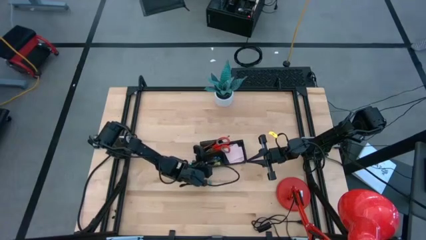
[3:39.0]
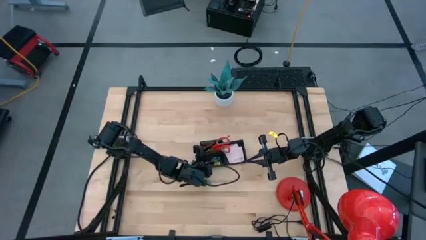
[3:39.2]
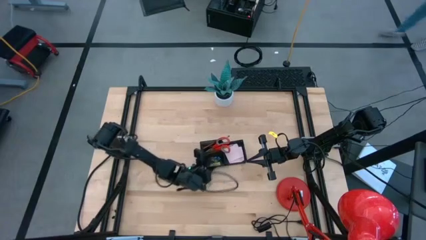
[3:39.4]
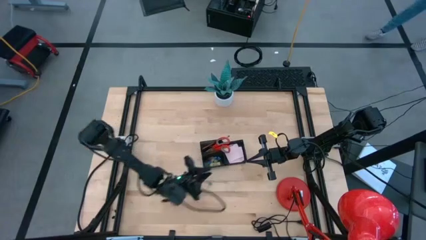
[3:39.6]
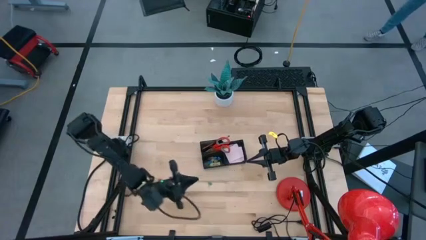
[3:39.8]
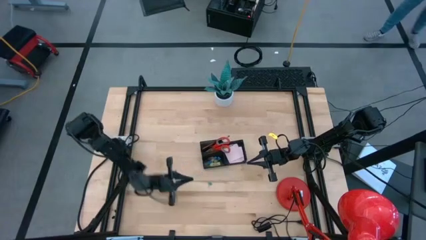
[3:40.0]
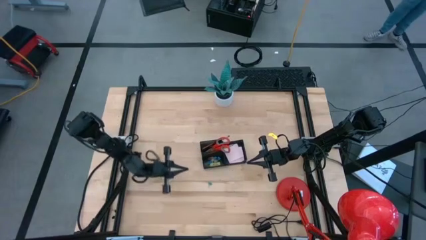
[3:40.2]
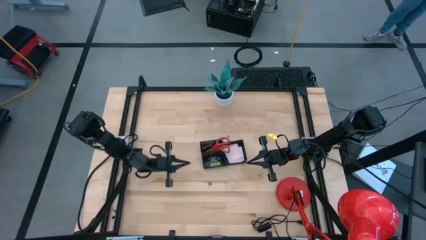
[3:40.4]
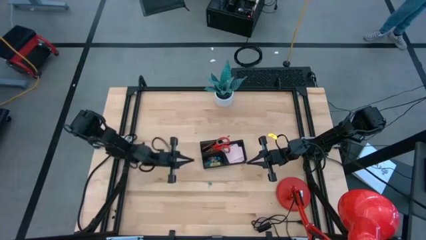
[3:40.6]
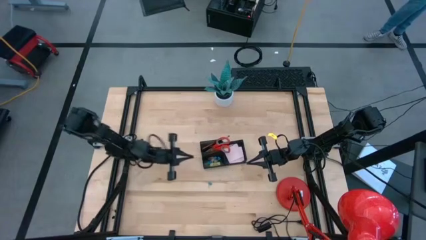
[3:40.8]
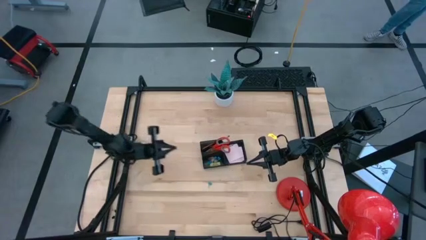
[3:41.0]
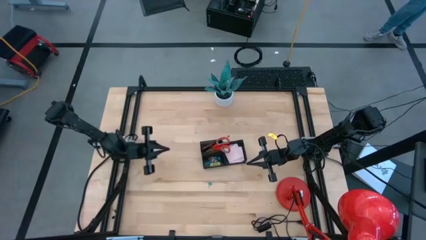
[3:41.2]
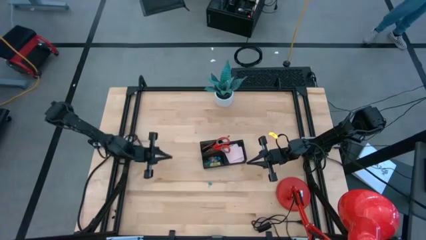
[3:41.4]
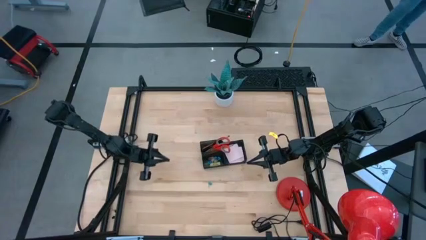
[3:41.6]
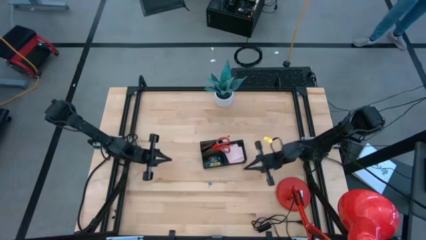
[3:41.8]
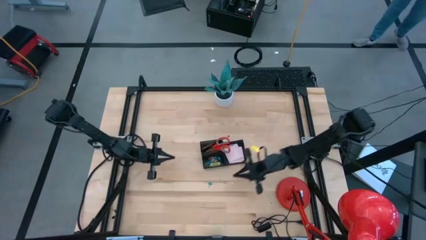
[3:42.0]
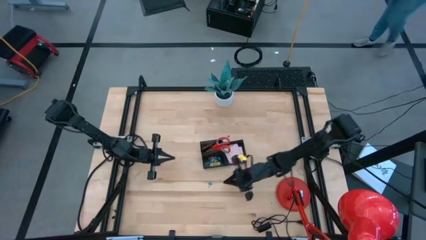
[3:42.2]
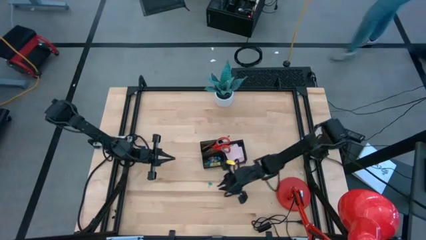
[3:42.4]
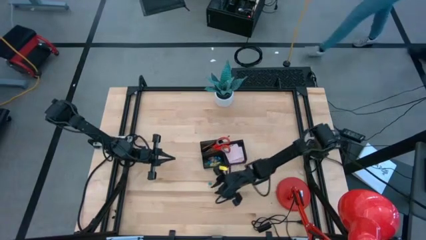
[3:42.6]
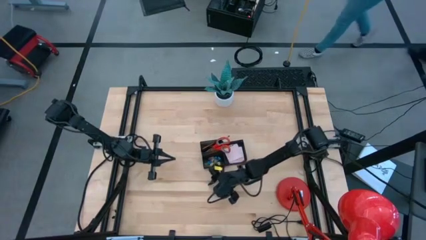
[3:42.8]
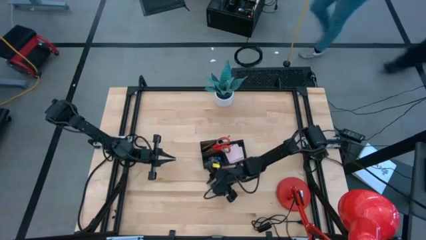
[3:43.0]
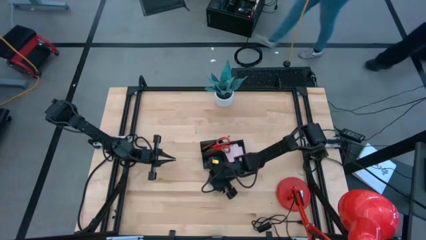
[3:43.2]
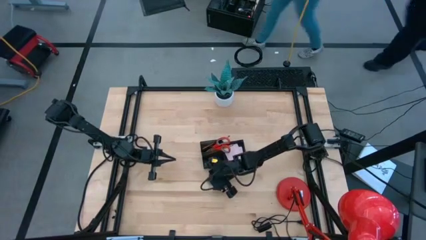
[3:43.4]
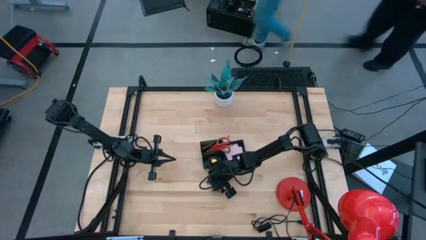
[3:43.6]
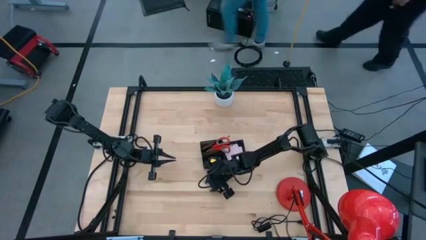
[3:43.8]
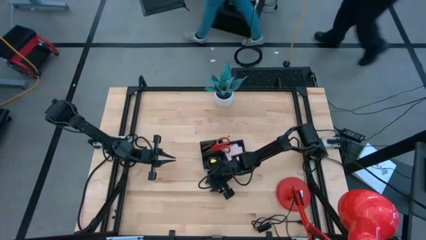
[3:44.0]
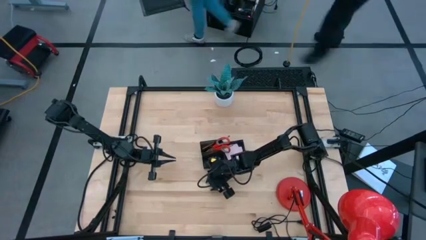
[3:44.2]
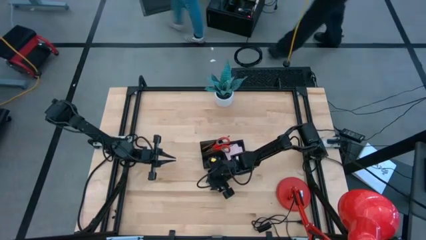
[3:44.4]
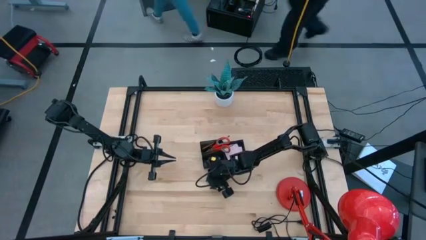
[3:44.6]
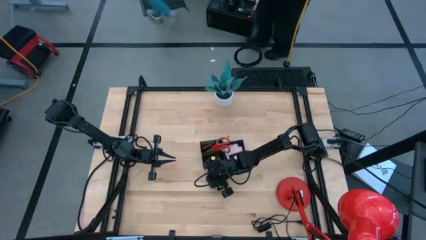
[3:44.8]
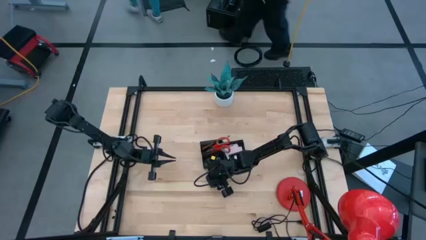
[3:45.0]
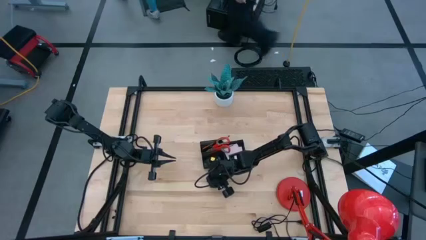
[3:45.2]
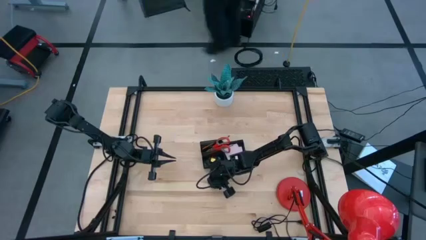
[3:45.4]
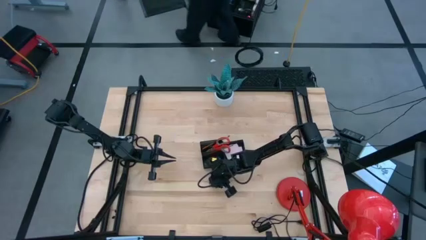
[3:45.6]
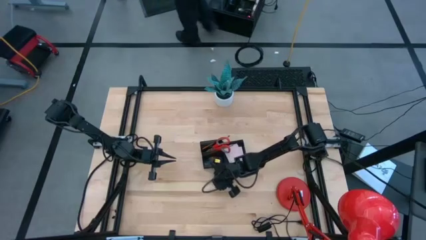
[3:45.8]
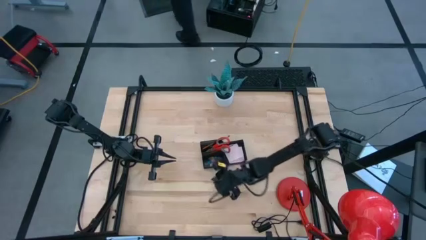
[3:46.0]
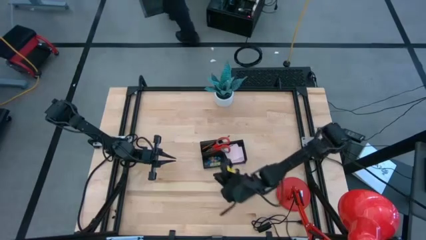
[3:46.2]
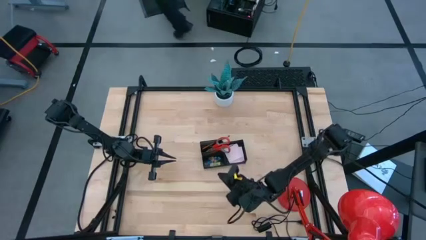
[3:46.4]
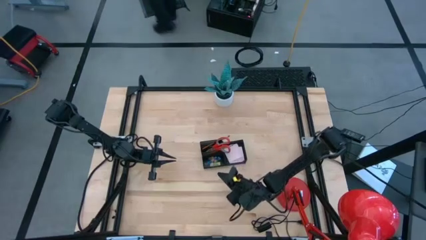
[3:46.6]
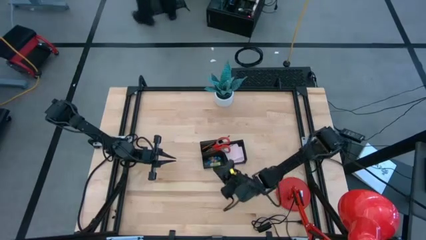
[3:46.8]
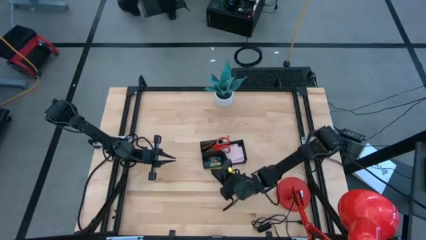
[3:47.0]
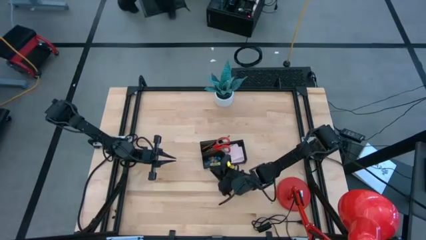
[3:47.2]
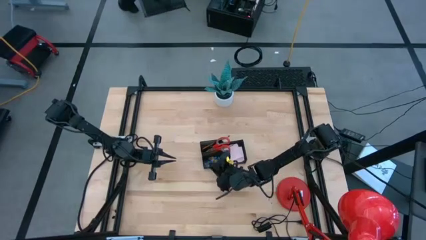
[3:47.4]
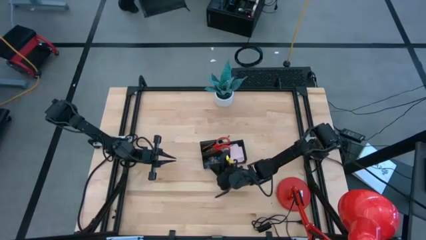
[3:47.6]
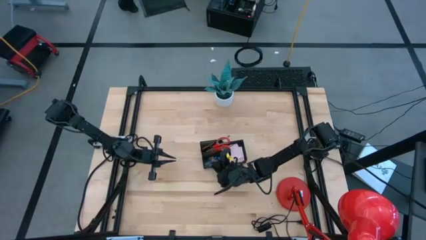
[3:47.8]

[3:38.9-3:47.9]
Task: Pick and place office supplies into organizer
Put the blue binder clip into the desk organizer

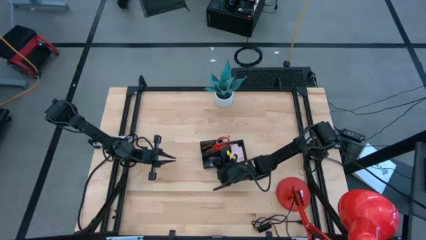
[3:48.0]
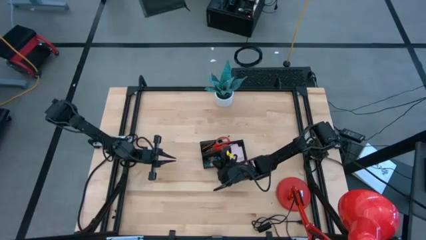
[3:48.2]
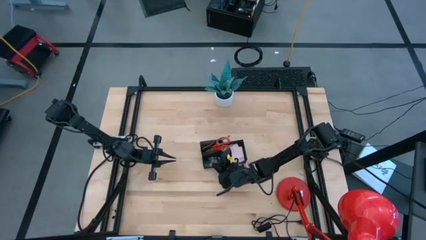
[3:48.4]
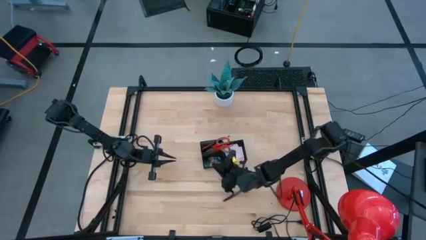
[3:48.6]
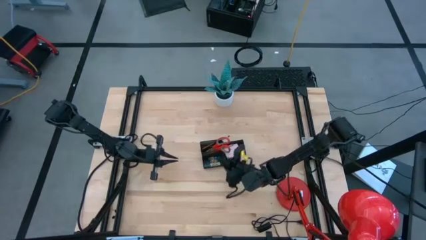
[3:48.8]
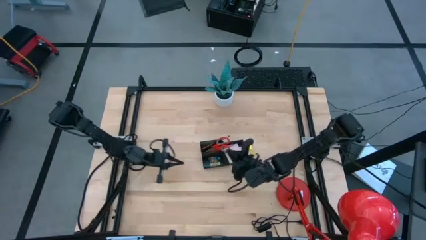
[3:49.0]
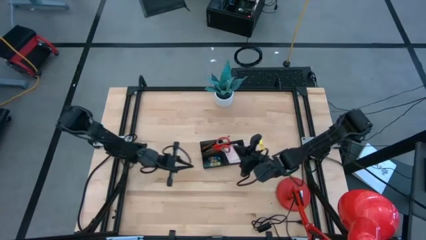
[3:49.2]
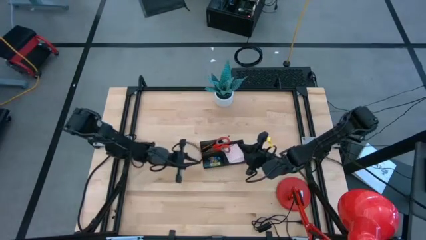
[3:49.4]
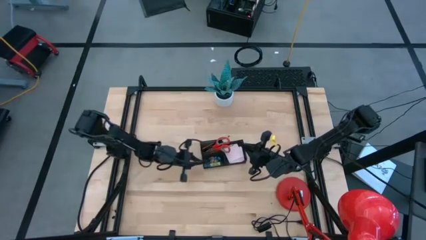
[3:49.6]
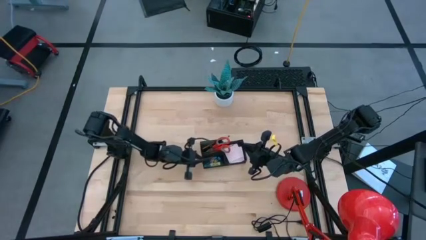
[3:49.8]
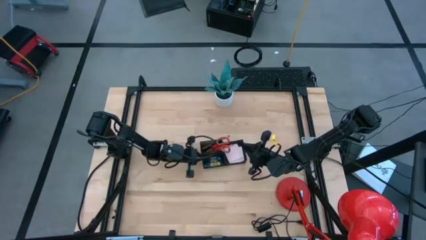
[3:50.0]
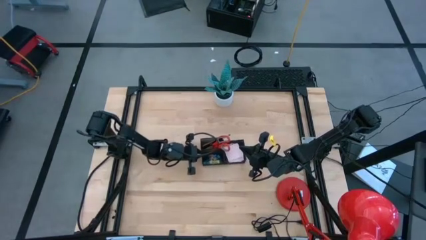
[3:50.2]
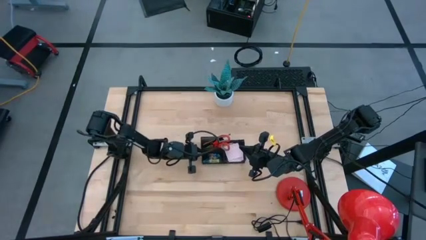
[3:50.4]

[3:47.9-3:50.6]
Adjust the desk organizer

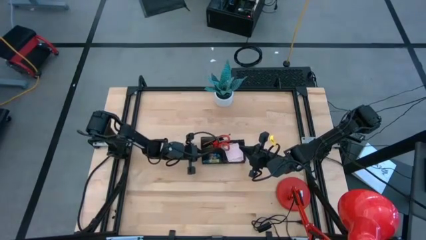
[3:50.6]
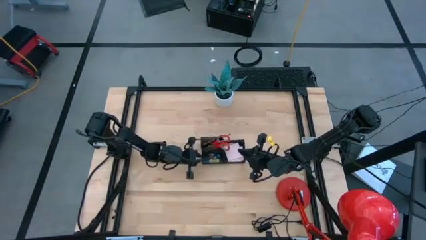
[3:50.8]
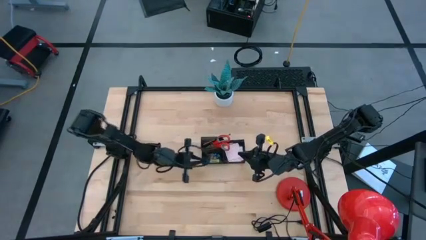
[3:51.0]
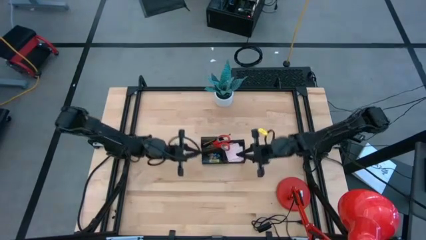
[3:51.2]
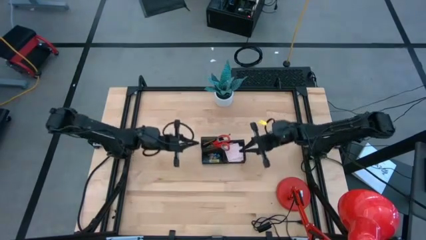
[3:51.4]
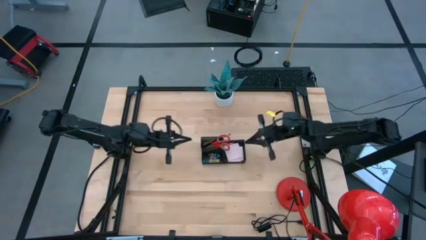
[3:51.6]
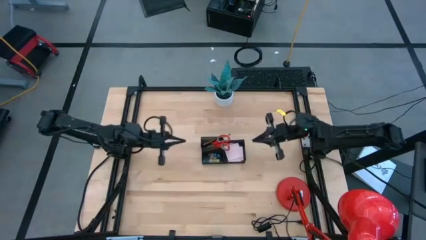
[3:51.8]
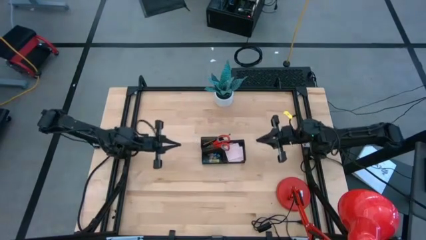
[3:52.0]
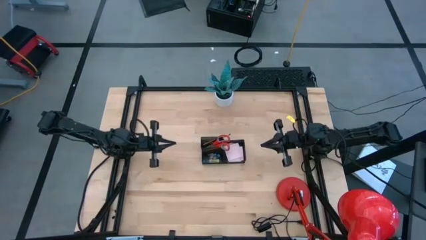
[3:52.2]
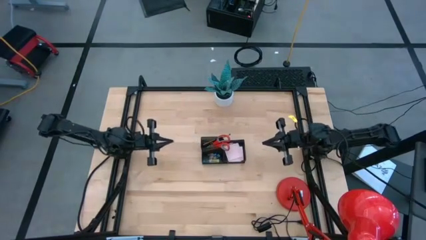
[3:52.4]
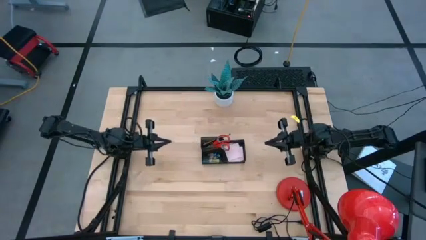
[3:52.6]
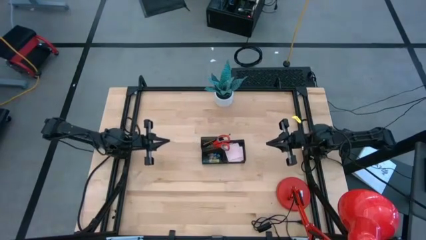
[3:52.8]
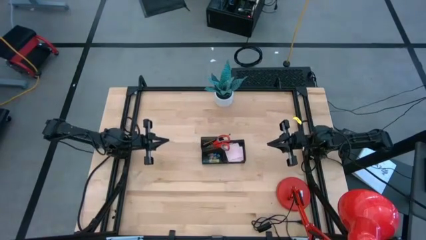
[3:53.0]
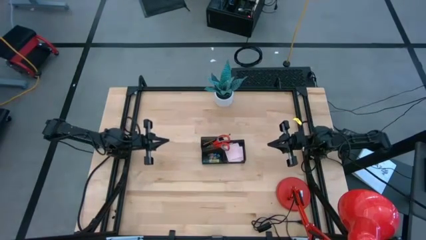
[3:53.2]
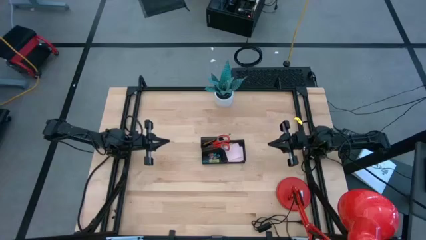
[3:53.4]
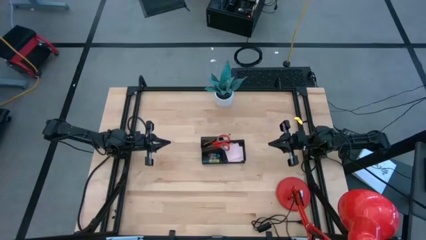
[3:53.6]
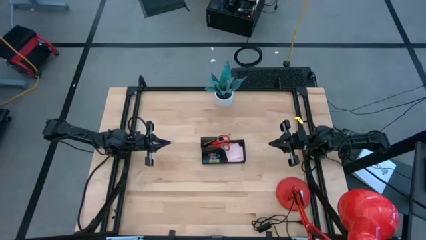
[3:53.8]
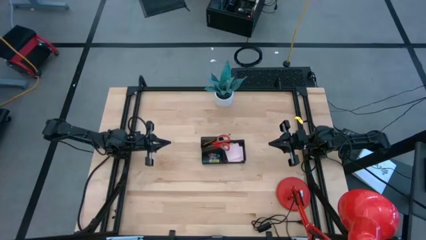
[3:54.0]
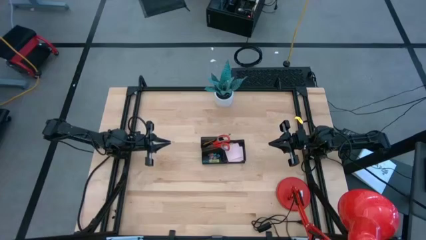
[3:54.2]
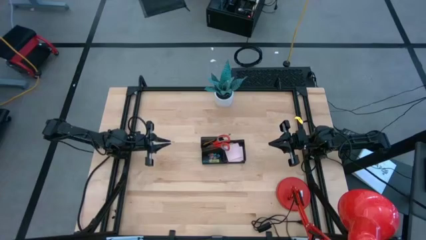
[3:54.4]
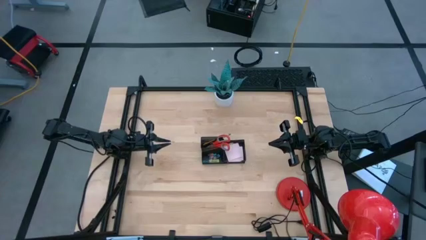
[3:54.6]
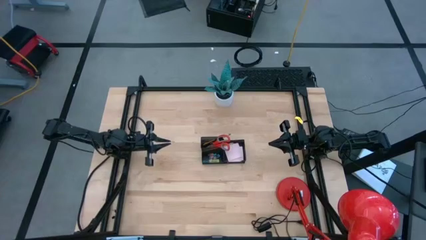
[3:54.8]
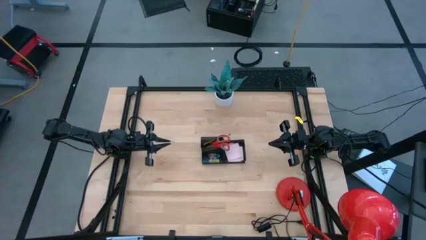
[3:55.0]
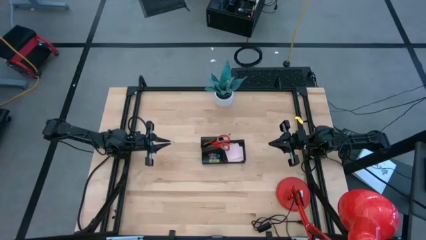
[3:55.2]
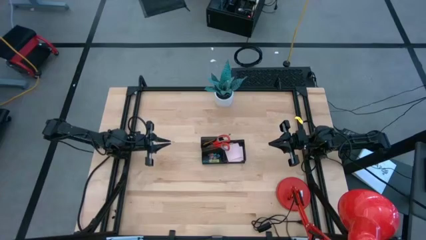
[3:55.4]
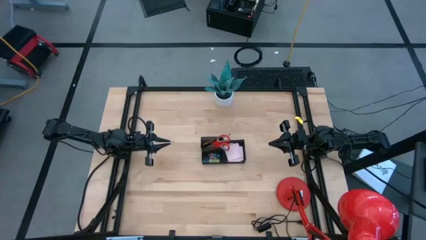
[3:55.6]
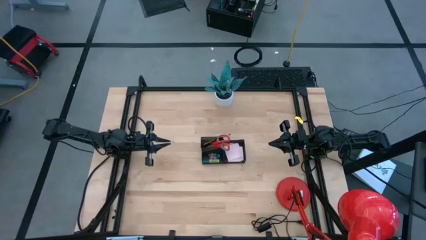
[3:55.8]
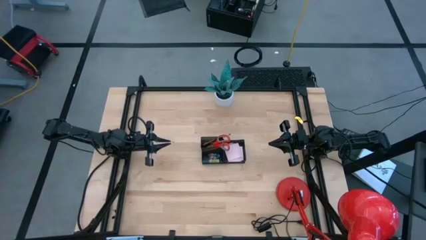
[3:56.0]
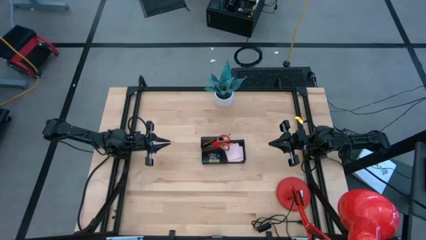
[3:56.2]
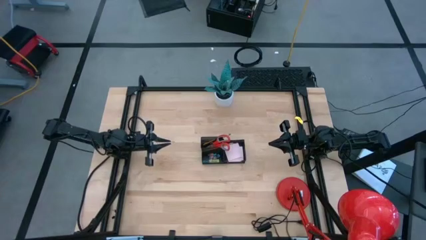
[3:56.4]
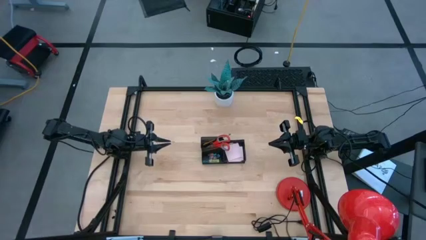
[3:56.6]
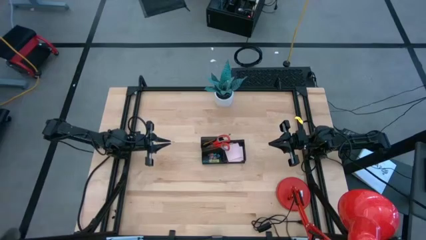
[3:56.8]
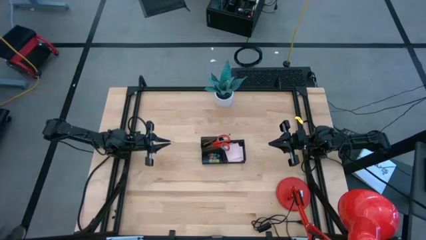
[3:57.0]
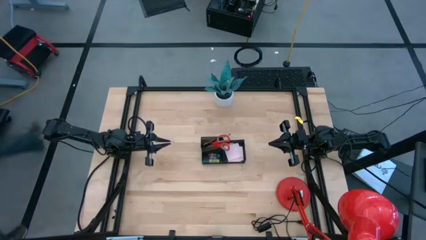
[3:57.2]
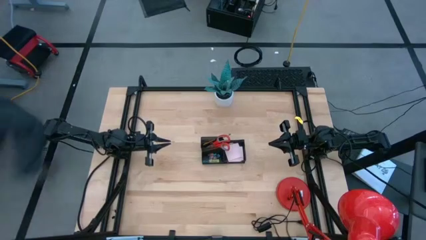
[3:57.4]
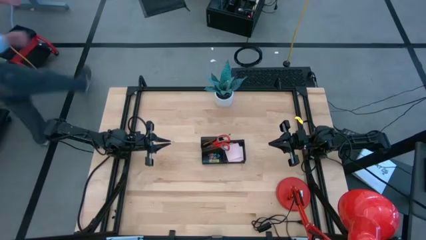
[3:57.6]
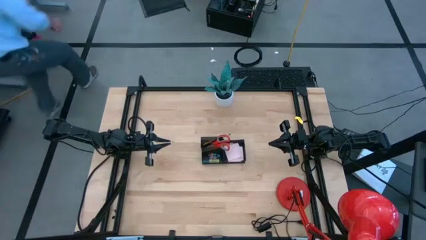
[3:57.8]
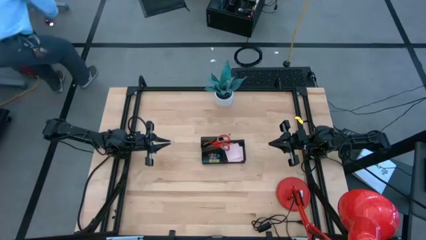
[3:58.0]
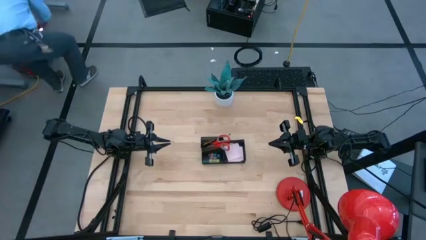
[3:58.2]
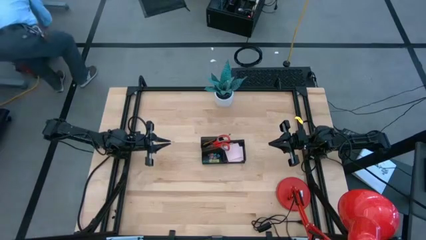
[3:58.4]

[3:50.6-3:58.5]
Return to Home Position
